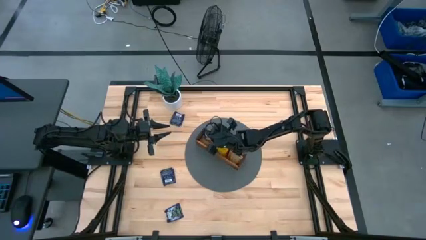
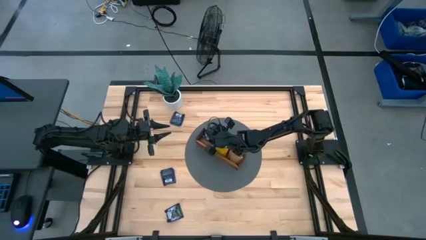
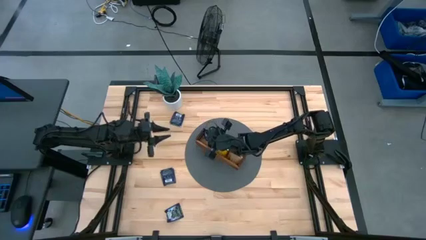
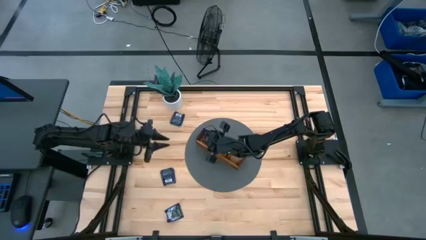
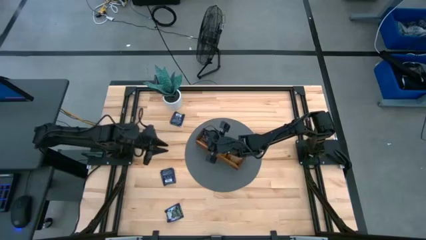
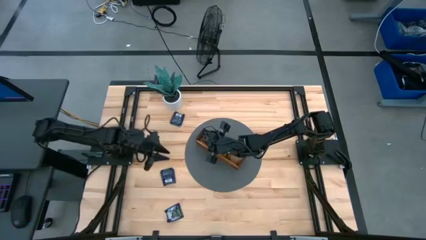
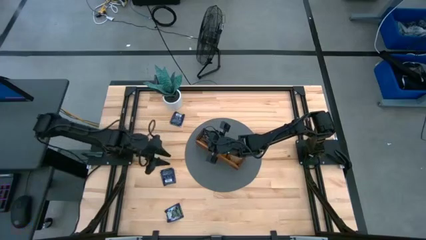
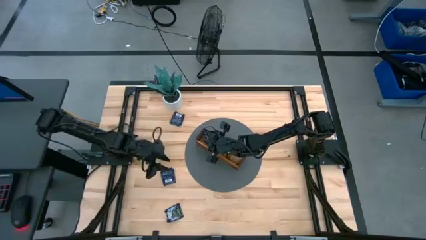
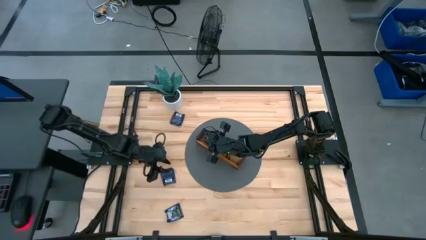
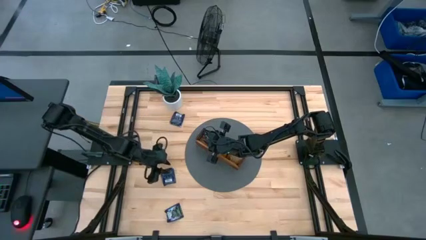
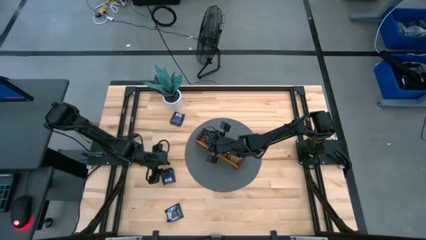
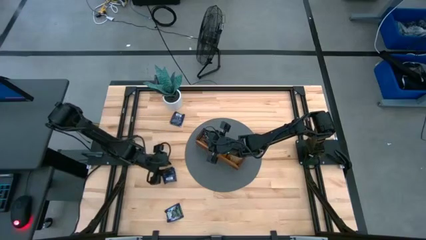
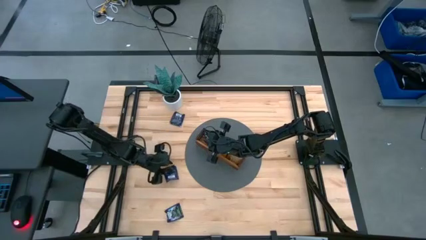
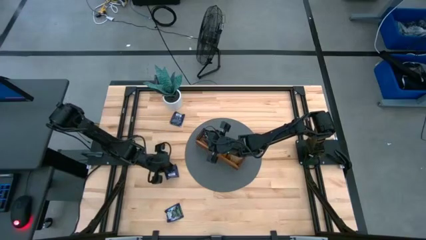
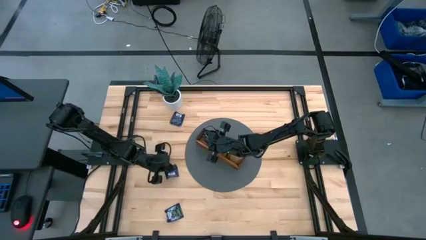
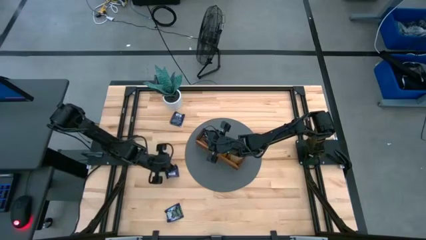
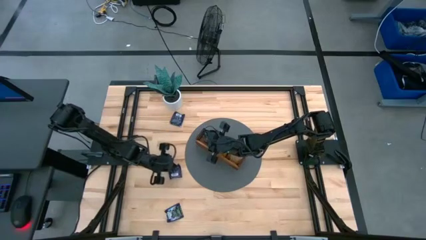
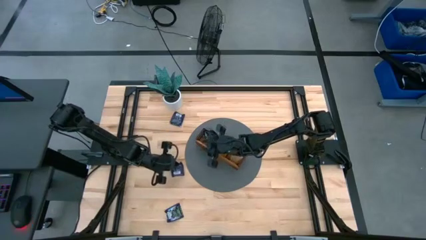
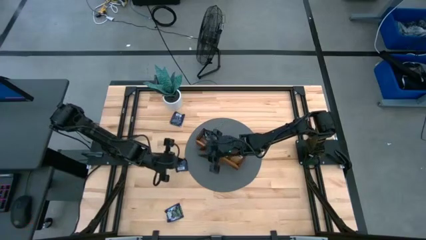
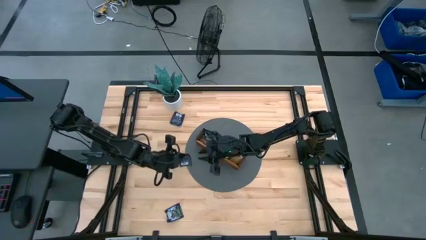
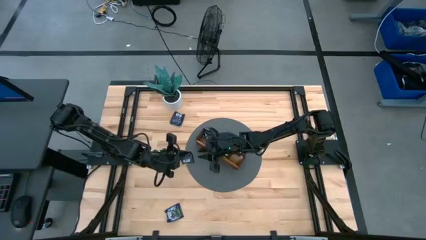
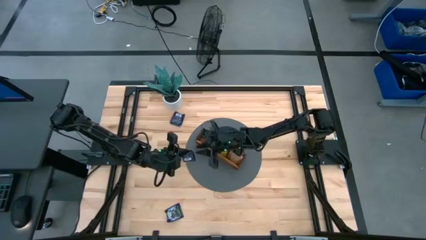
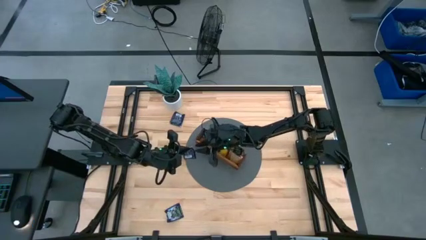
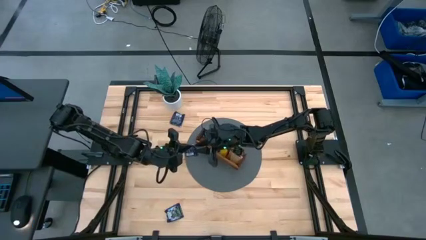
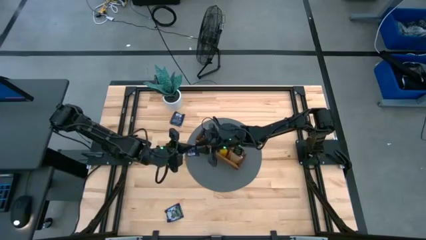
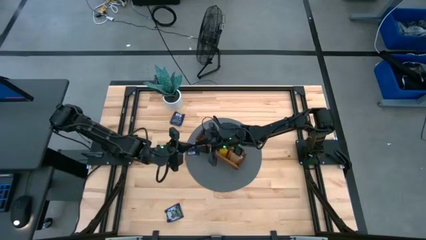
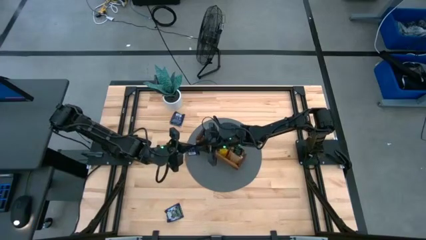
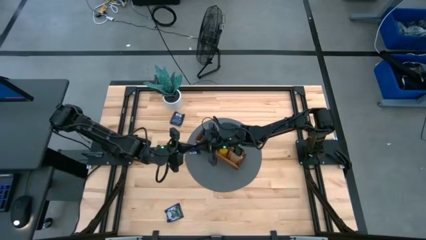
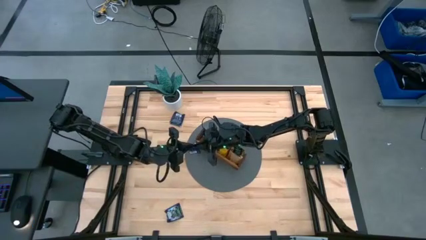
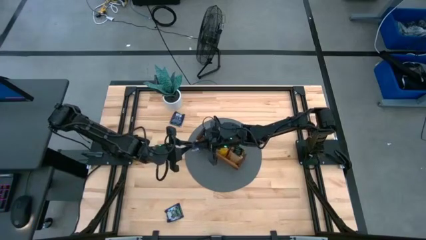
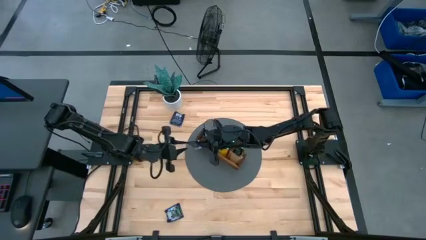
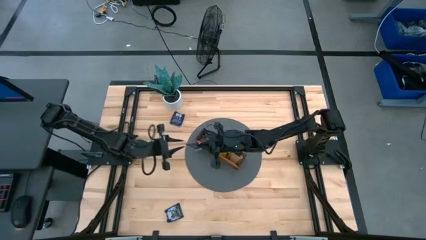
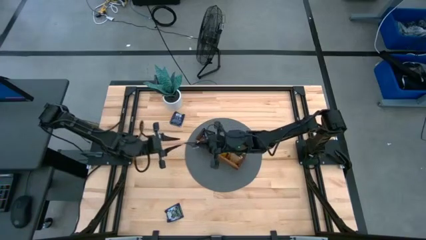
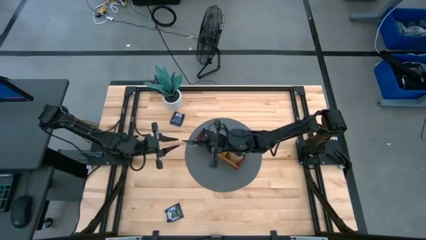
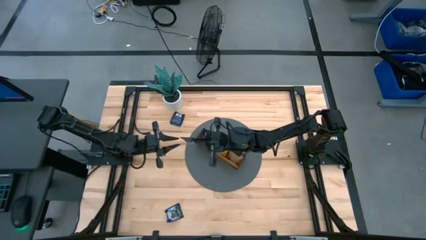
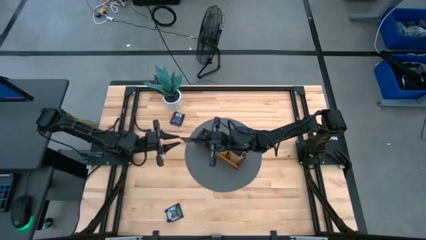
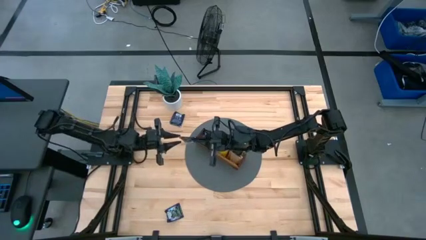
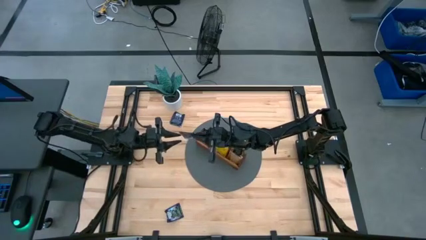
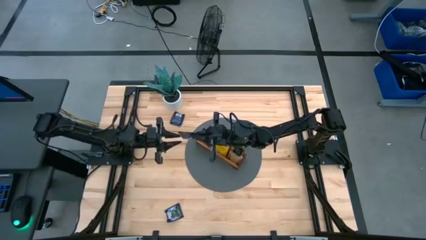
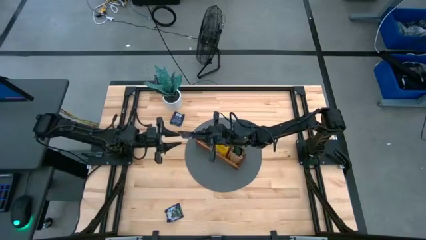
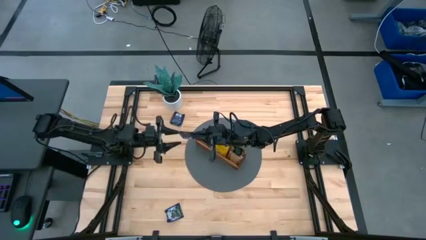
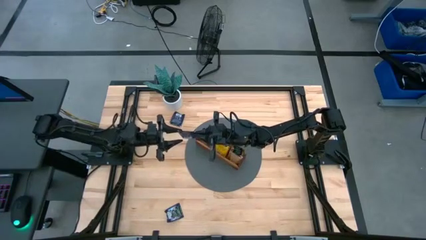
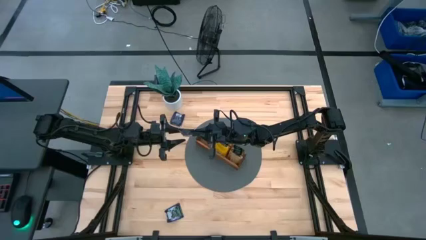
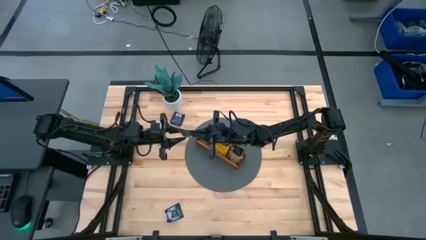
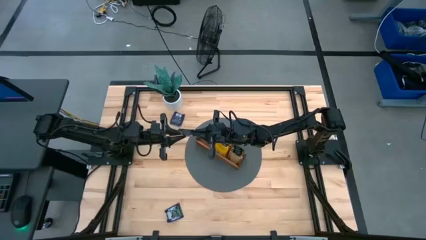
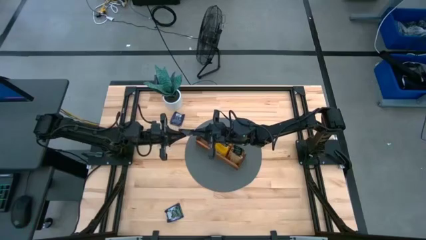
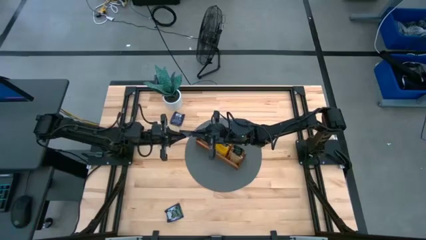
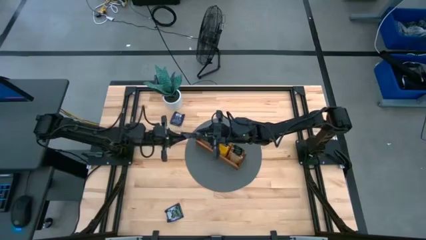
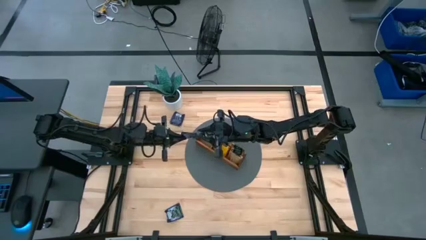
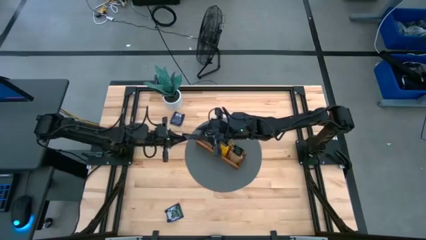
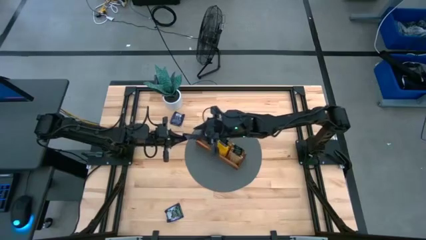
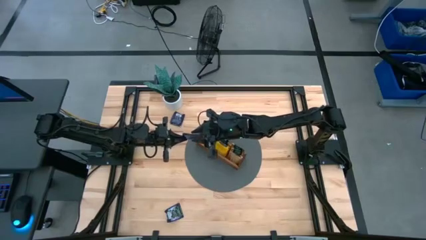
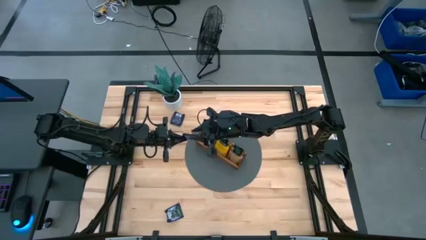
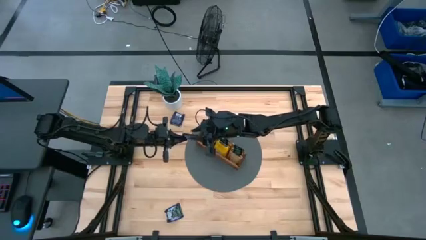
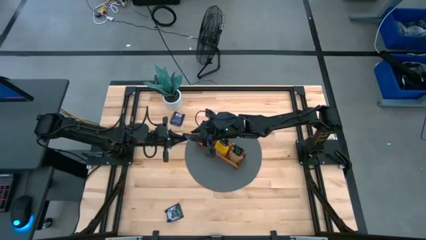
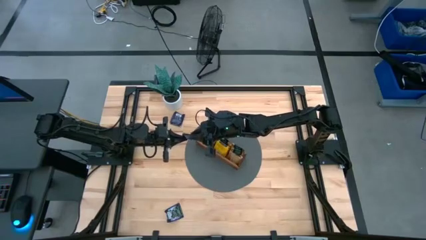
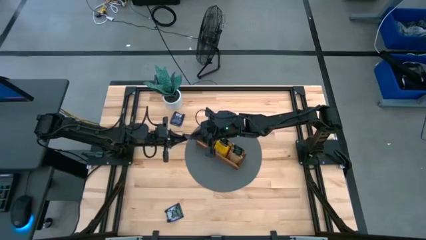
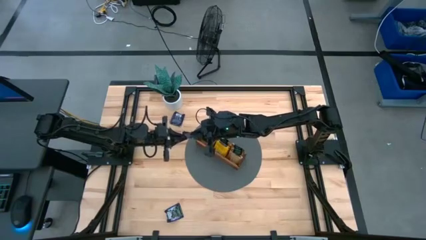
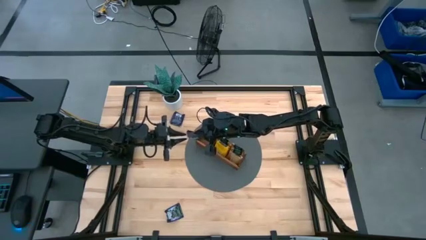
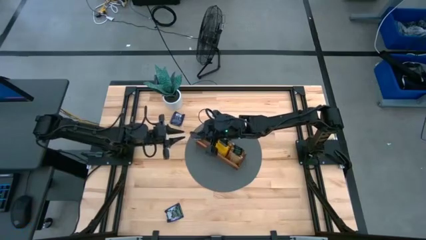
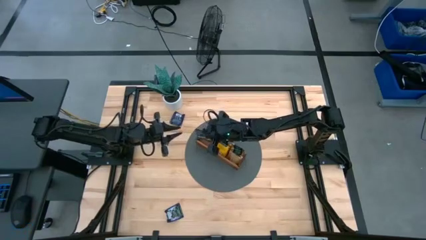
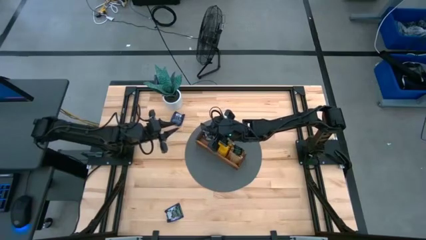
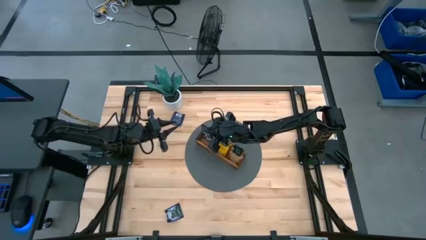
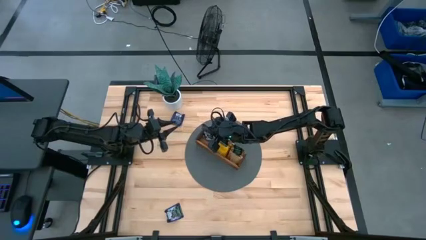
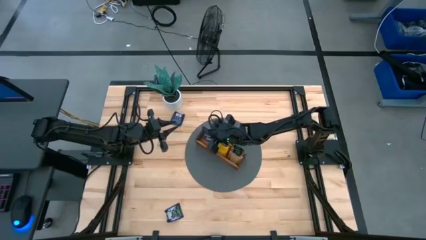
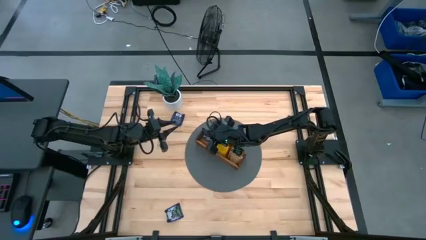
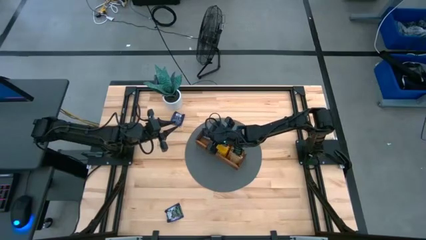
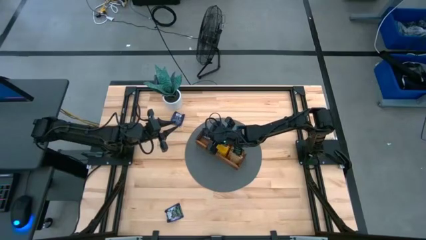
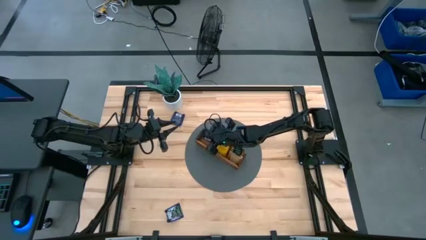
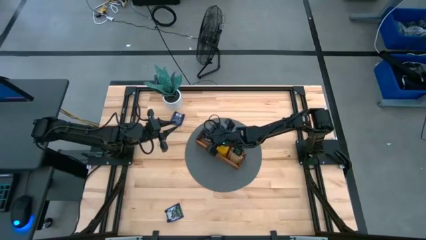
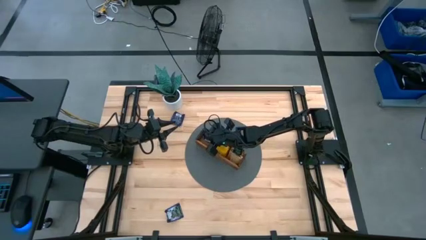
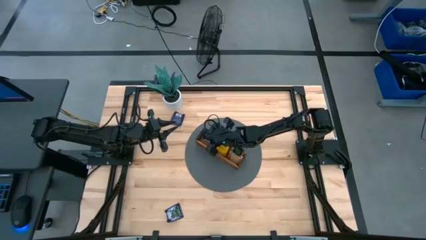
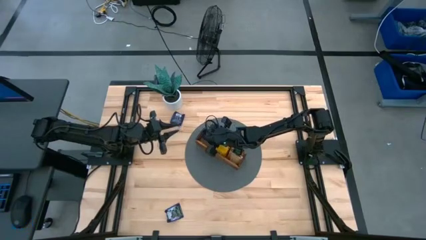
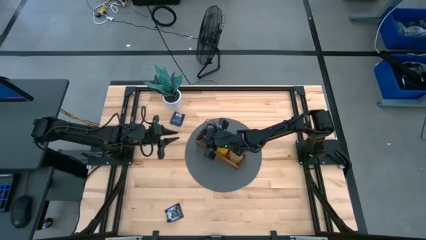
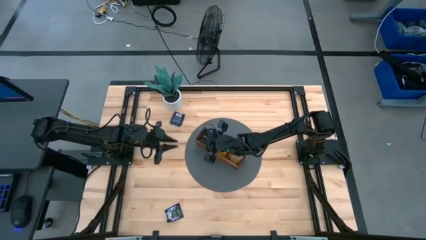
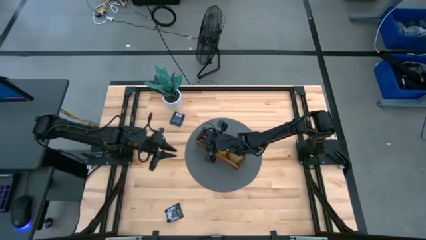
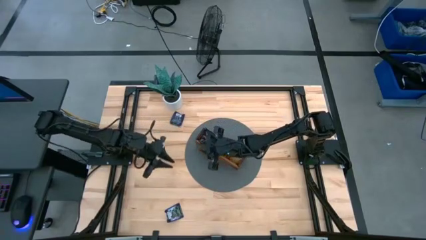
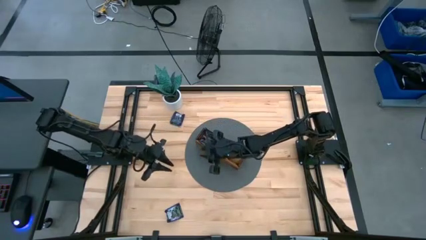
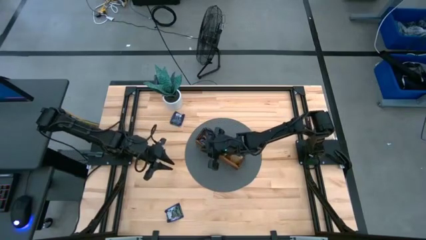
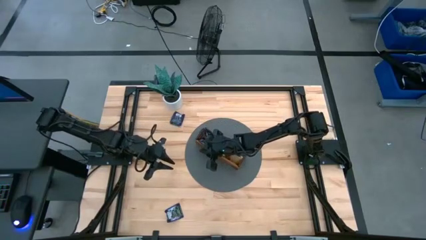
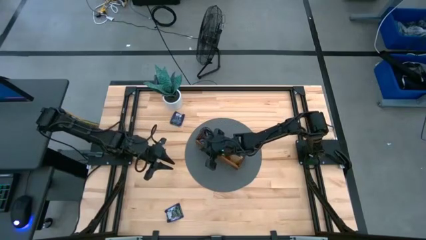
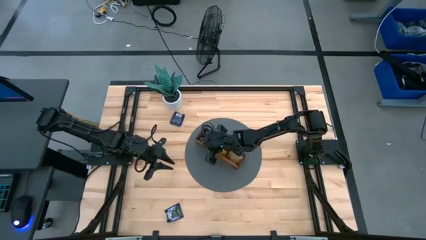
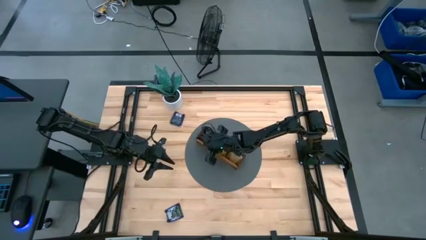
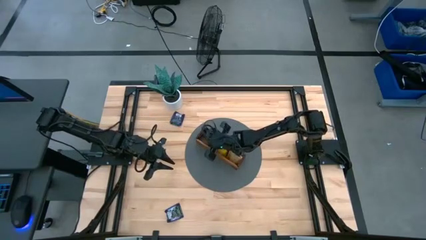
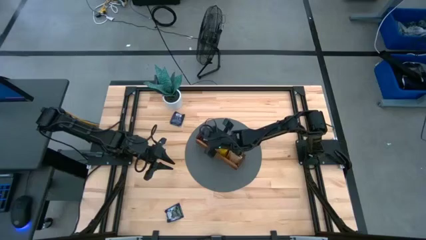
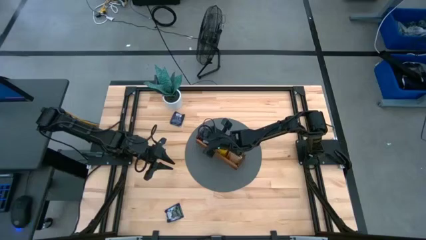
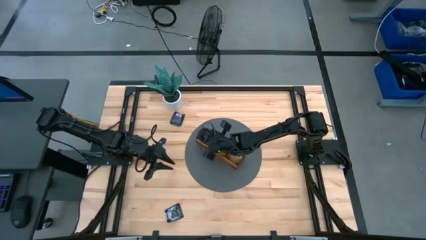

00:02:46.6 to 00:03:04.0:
Task: Pick & Place Tea
Put the dark blue tea bag into the left section of the wooden organizer
